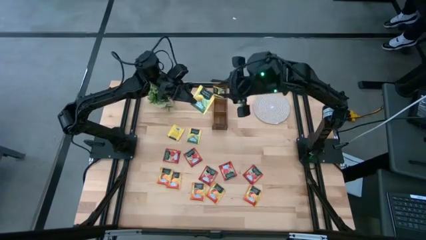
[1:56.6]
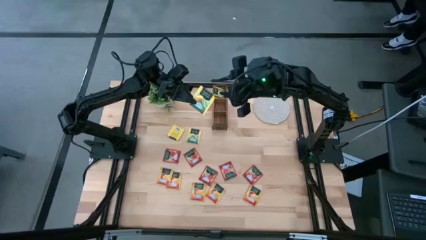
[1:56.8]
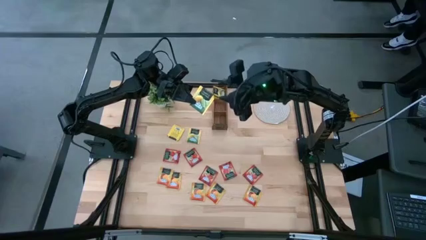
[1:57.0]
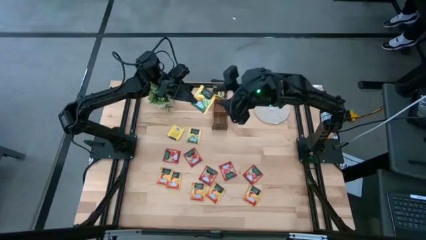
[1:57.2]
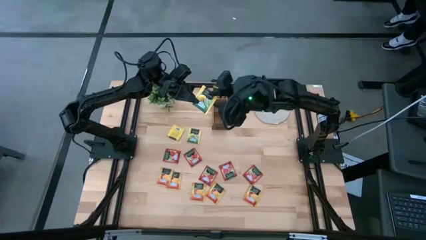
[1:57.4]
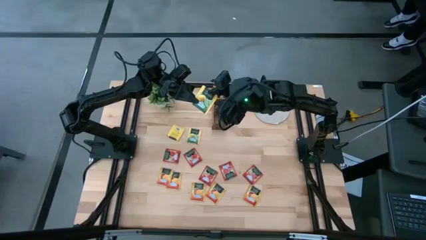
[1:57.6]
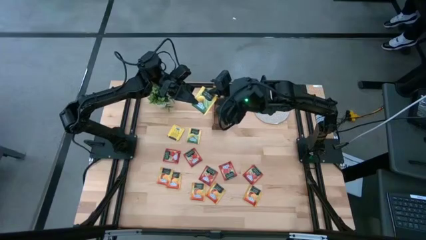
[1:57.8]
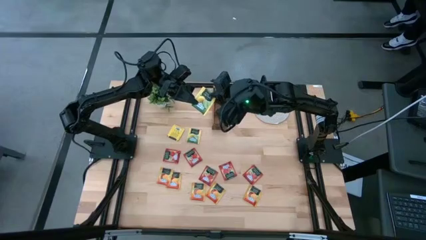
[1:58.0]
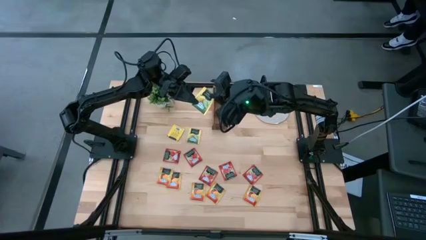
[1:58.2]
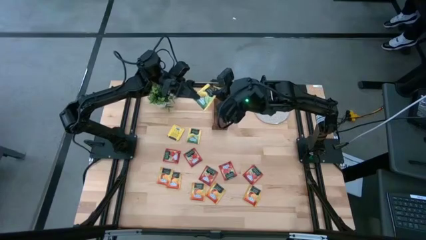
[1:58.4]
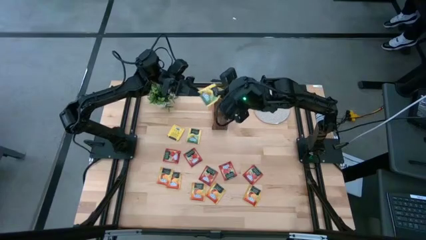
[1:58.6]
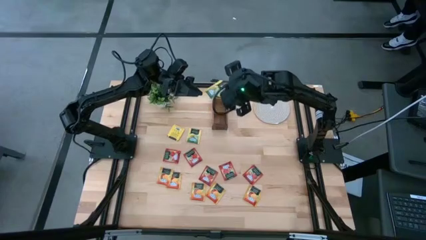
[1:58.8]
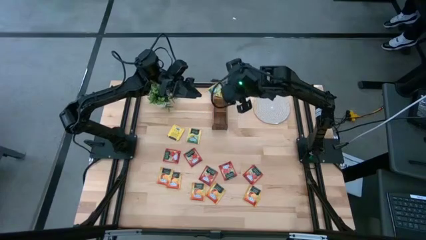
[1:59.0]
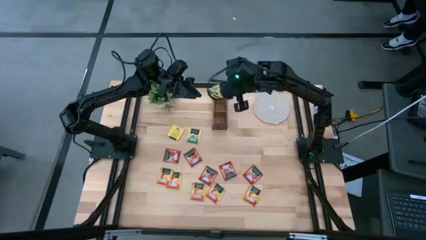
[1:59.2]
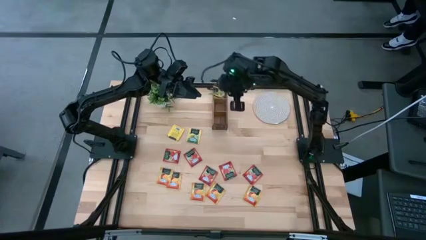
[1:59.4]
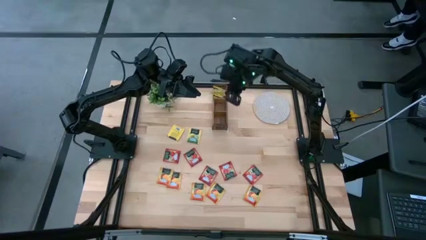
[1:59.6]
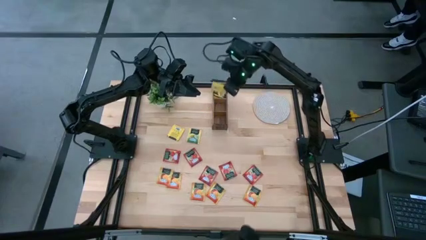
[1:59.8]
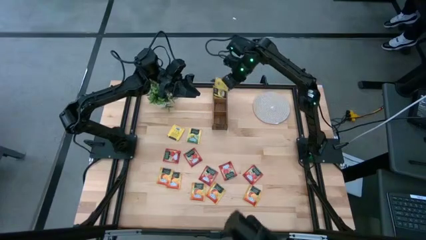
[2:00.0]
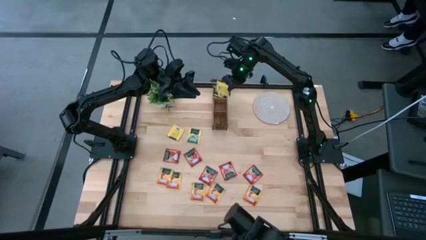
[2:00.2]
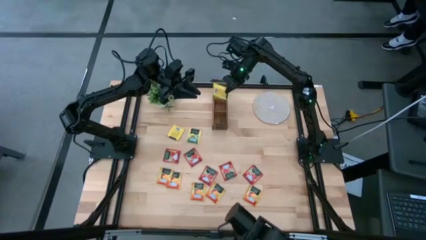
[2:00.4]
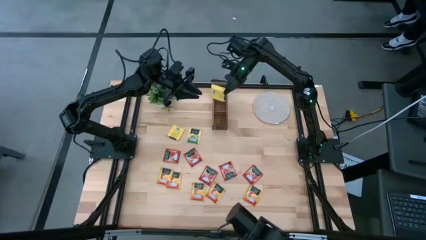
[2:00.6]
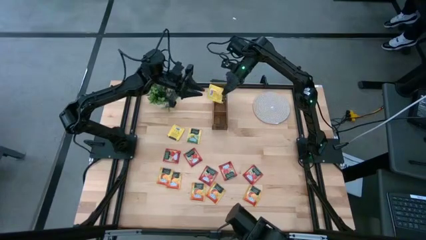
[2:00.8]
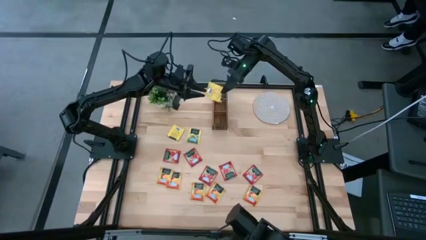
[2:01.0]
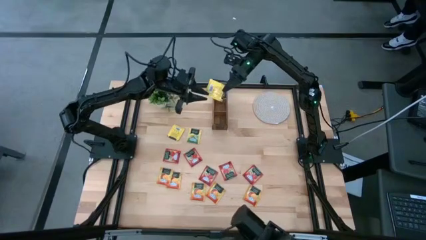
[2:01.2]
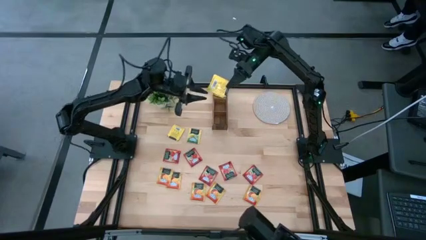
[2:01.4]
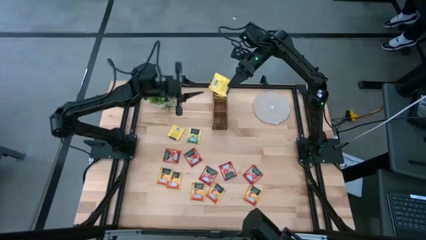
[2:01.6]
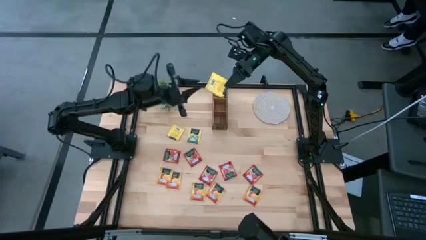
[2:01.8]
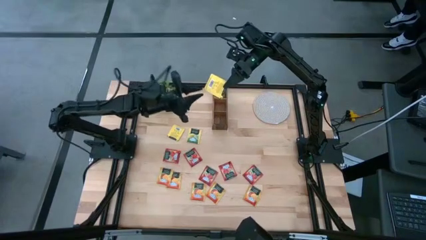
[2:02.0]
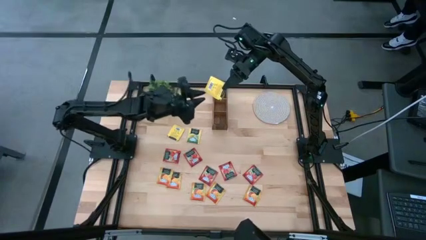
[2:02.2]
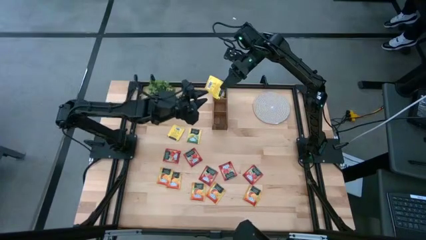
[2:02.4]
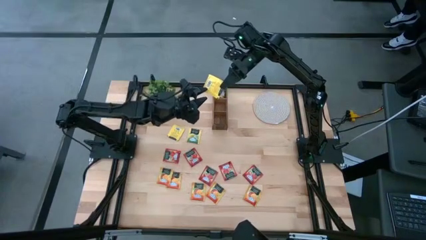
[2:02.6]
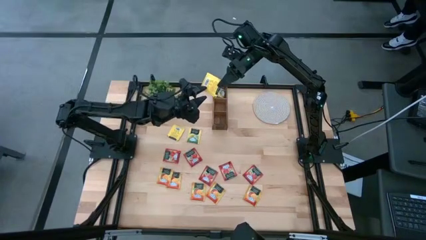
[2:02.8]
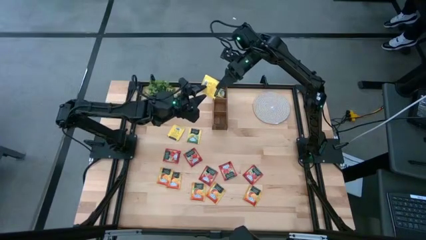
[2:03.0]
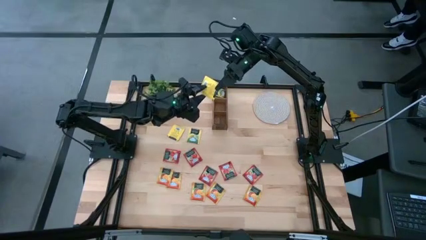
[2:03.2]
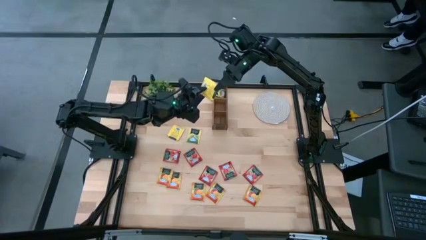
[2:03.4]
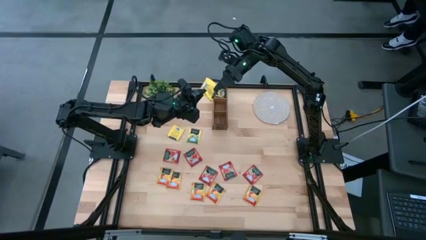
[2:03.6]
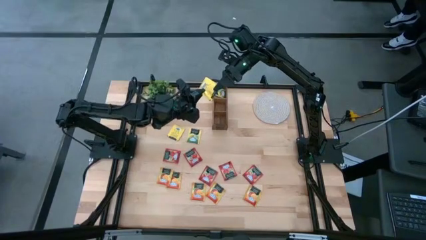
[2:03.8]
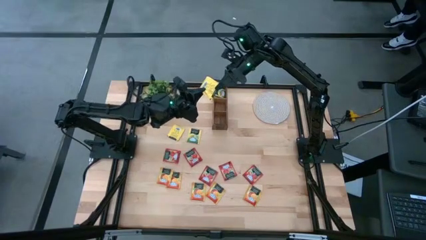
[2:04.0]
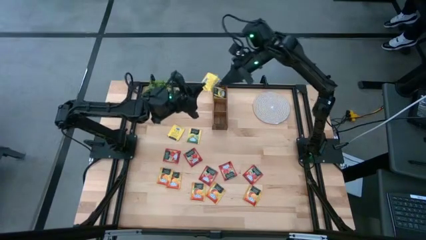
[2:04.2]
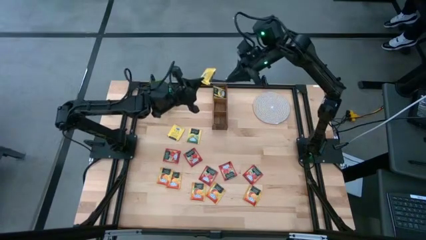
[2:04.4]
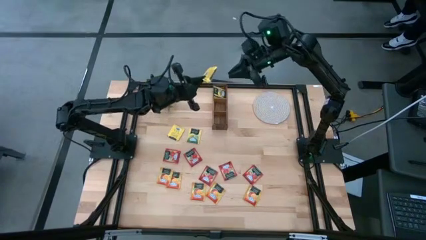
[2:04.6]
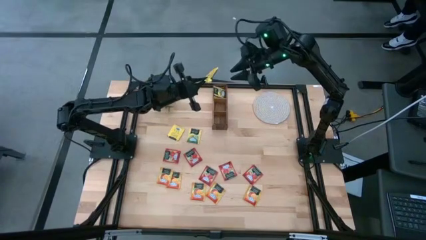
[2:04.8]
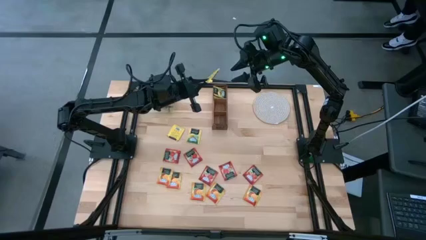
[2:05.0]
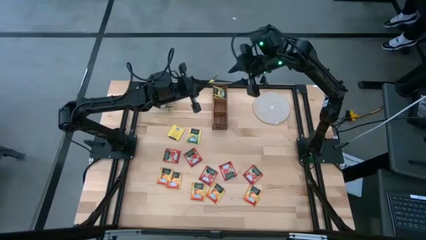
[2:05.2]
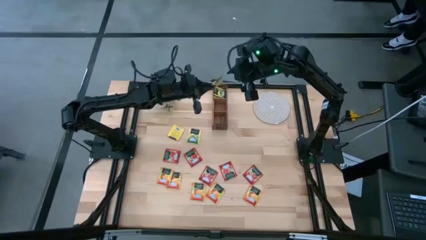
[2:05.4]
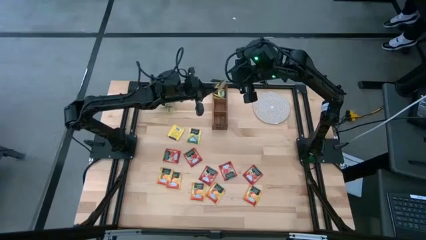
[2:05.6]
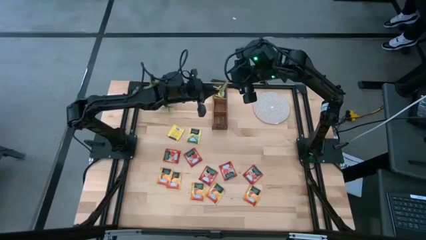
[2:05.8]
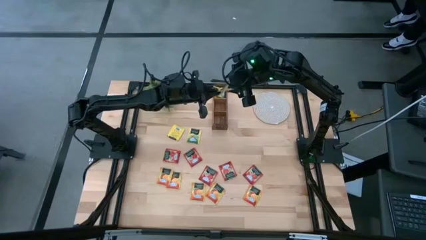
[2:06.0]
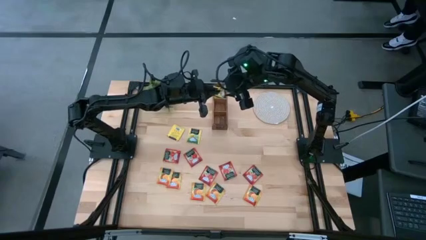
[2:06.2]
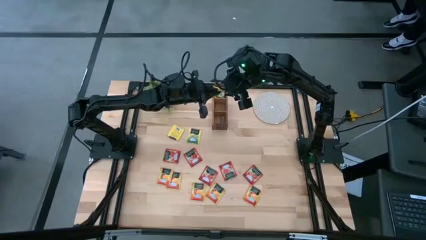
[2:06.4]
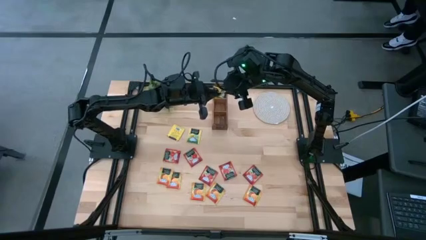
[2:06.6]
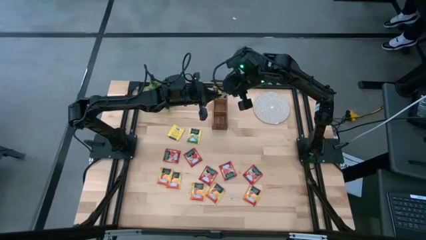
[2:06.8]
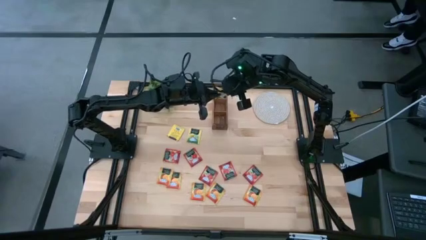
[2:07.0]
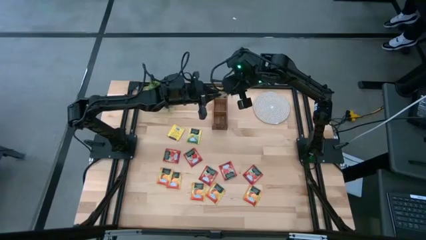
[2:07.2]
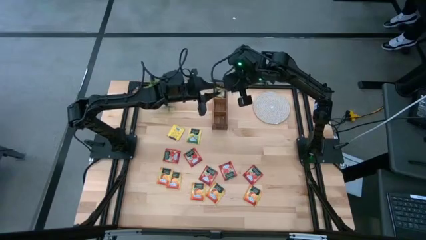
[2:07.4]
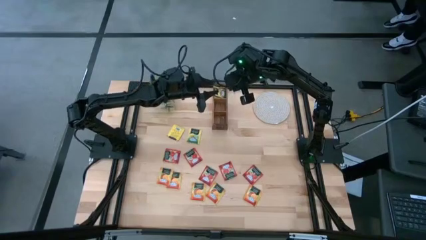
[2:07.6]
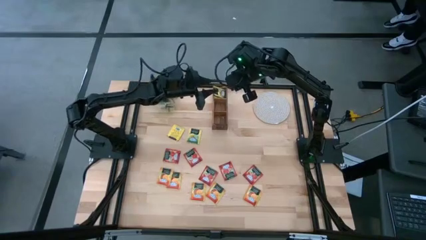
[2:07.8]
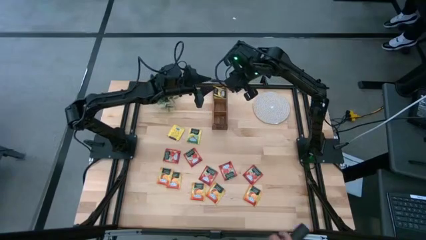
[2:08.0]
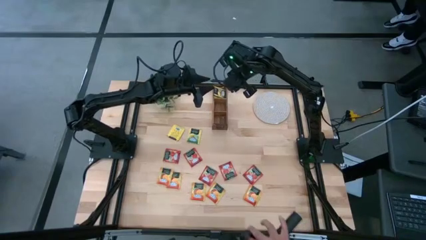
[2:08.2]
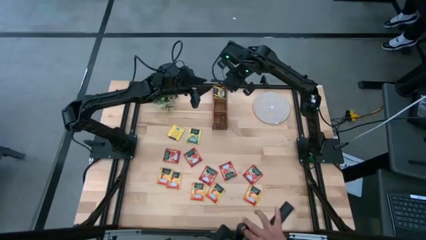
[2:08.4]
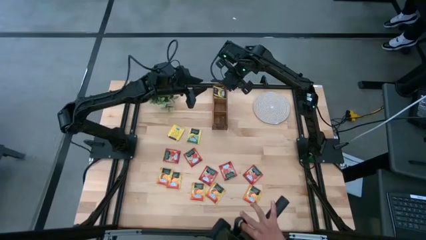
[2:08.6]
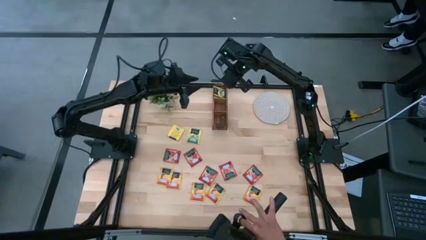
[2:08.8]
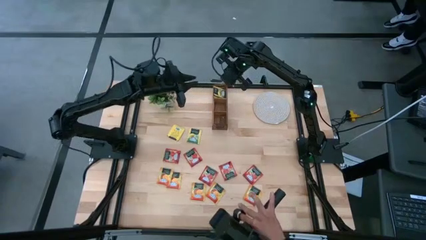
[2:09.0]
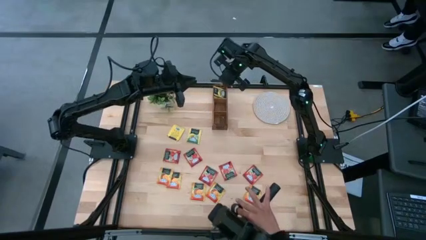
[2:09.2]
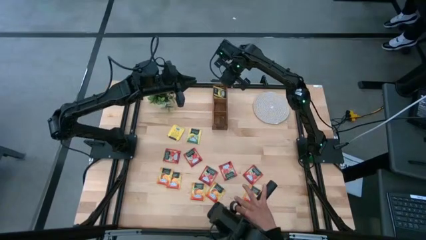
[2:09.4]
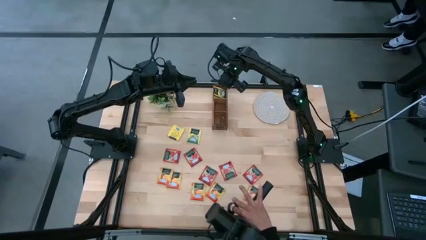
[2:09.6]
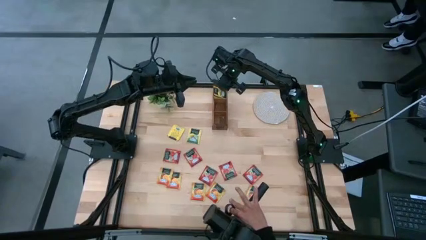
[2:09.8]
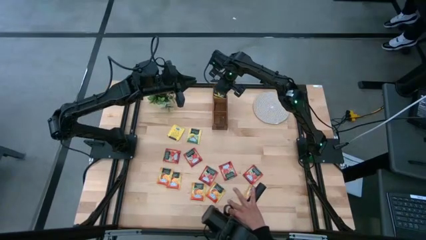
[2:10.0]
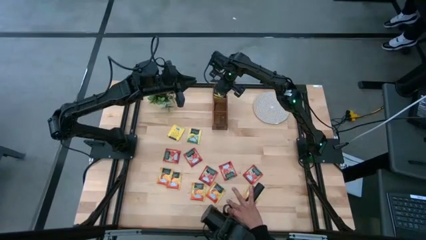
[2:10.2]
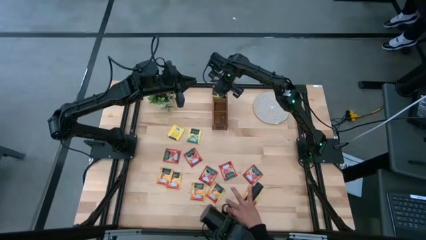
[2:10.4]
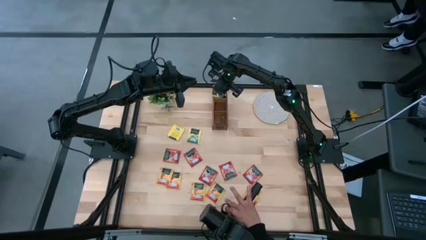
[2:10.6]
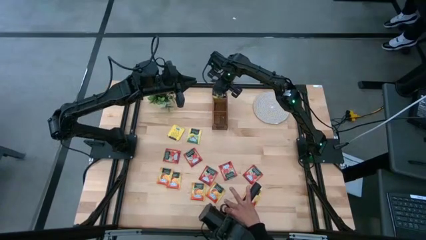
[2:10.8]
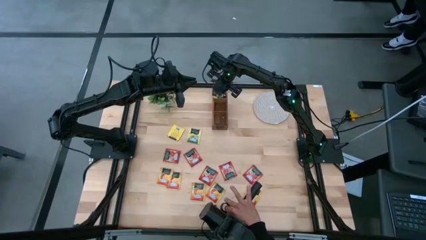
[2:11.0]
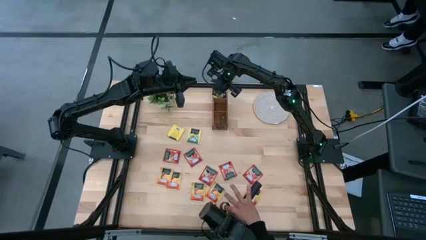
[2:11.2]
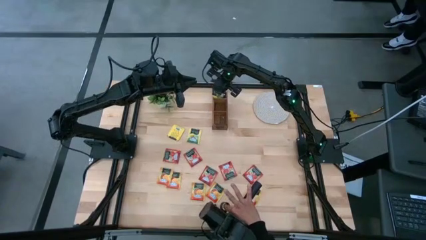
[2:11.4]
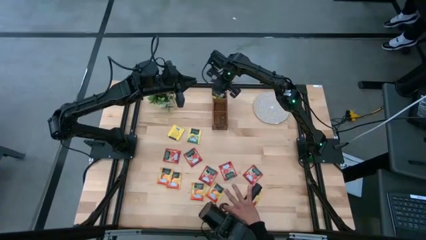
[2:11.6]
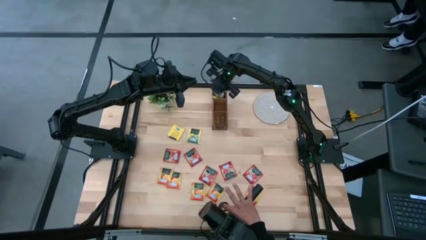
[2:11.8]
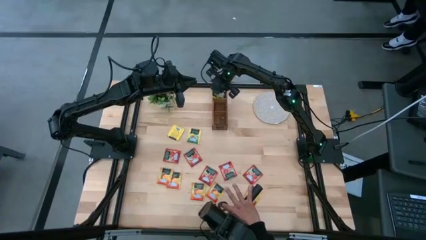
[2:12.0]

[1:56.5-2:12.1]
Task: Pick & Place Tea
Put the yellow tea bag into the left section of the wooden organizer

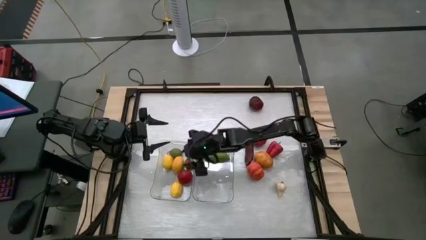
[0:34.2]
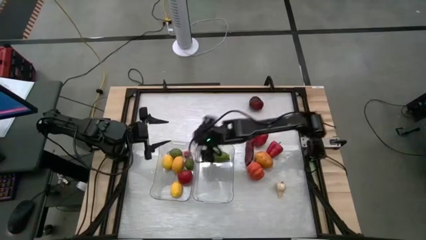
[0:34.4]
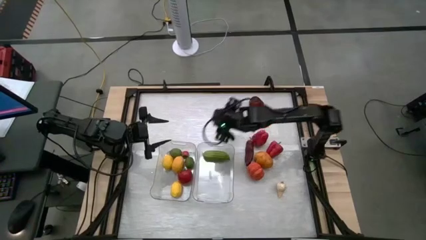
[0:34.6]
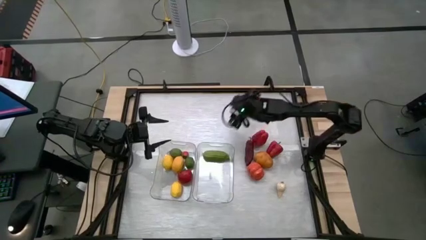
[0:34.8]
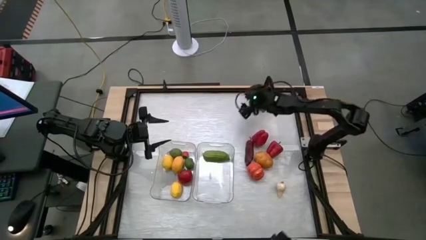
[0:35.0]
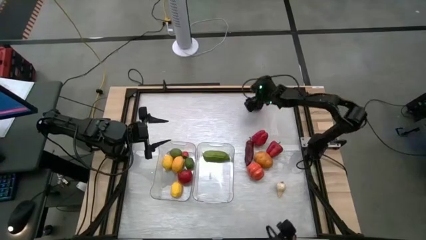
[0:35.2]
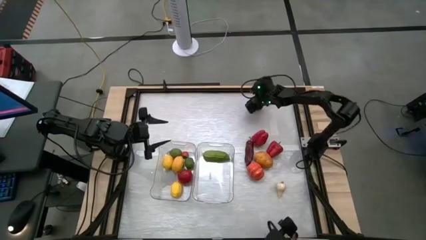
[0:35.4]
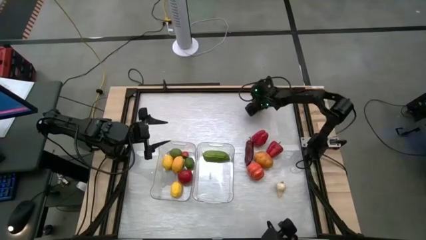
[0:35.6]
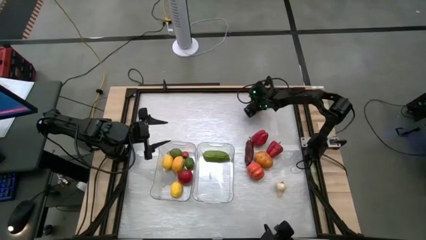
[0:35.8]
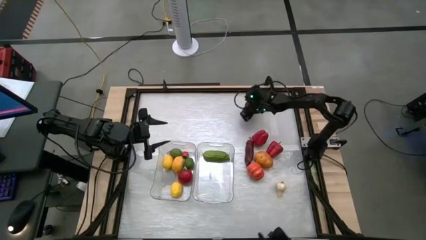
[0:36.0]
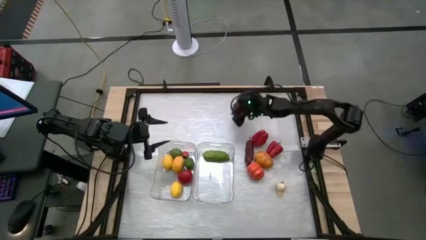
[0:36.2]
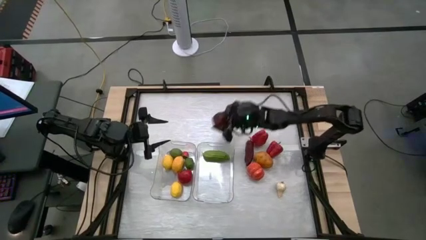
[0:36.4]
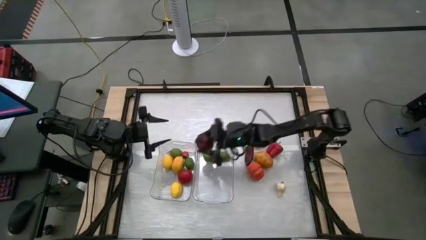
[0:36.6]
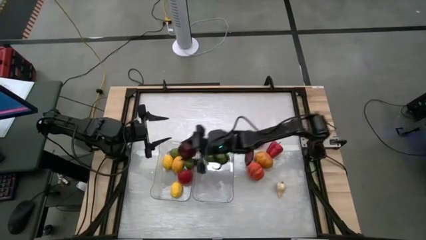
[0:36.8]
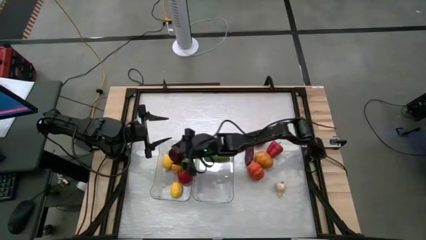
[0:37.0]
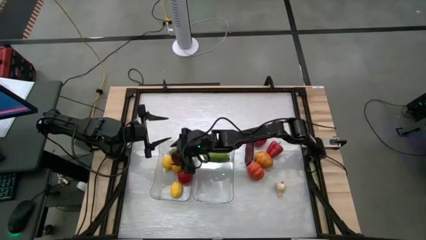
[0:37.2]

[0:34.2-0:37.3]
Task: Sort produce into baskets
Put the apple into the left transparent bin
